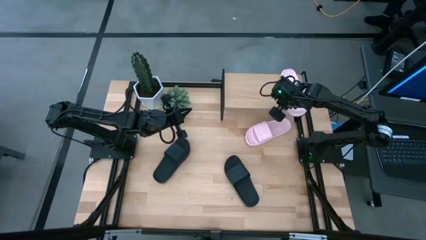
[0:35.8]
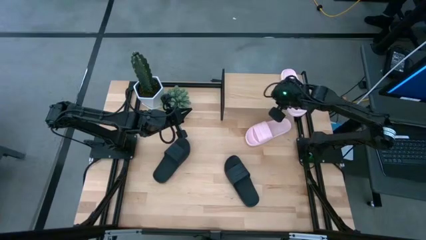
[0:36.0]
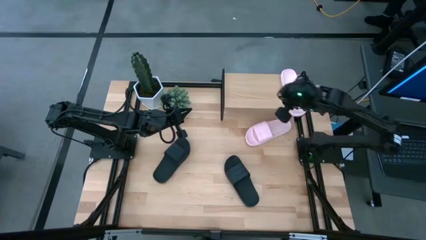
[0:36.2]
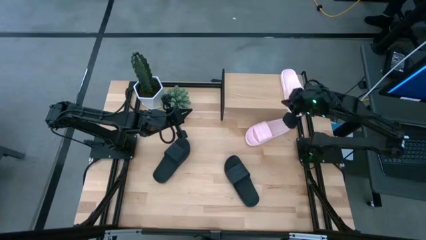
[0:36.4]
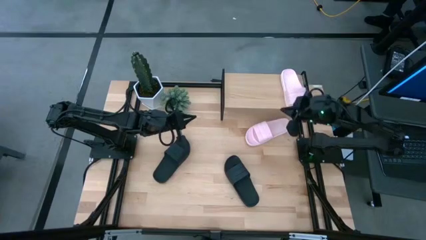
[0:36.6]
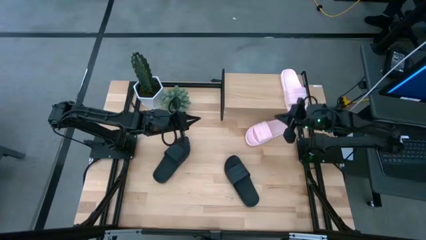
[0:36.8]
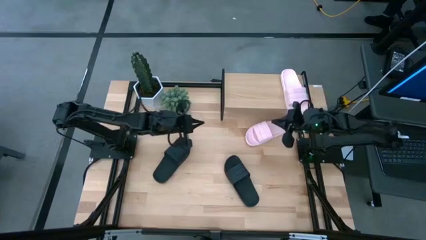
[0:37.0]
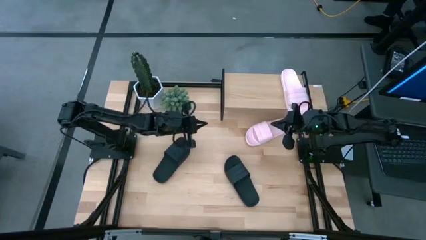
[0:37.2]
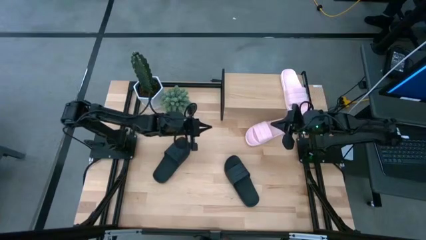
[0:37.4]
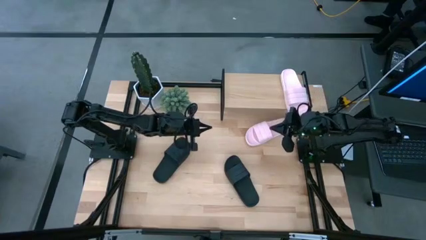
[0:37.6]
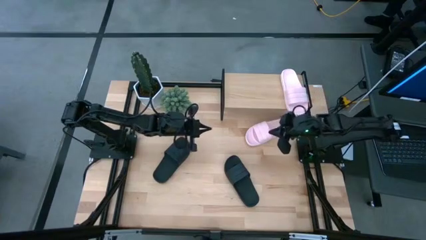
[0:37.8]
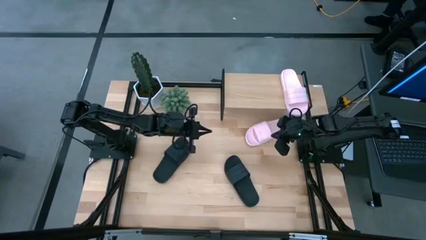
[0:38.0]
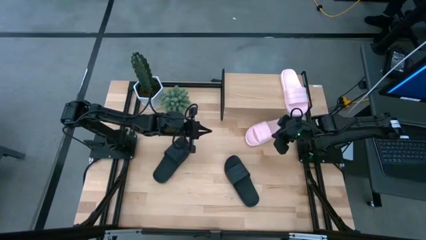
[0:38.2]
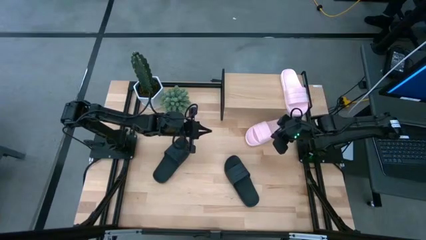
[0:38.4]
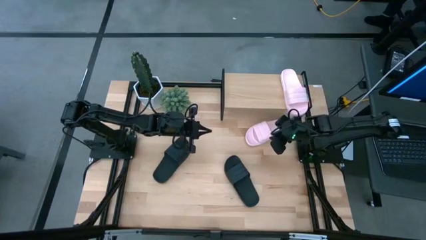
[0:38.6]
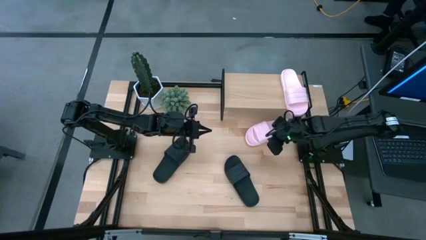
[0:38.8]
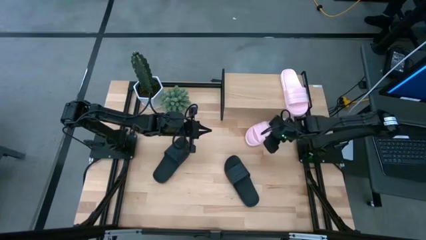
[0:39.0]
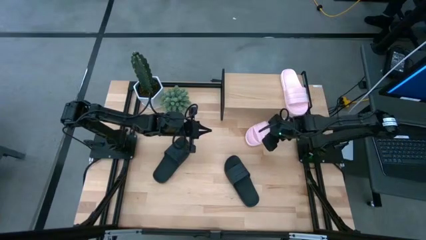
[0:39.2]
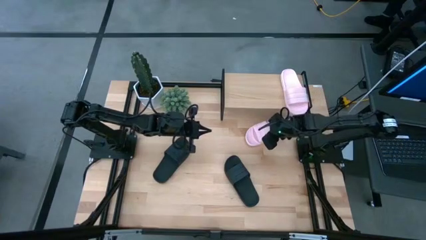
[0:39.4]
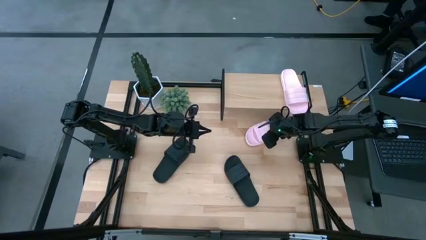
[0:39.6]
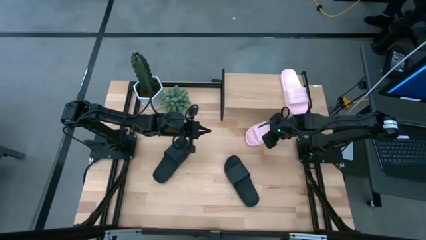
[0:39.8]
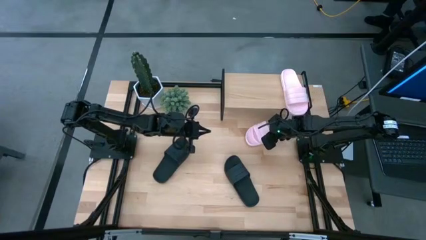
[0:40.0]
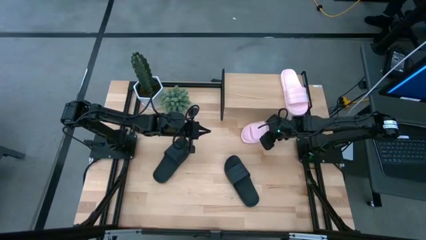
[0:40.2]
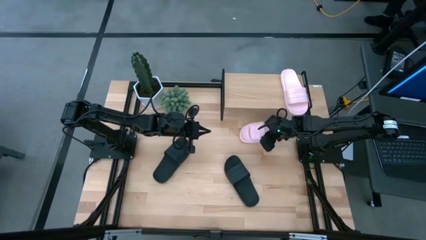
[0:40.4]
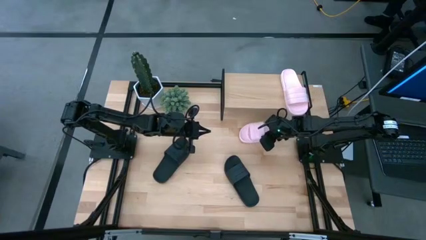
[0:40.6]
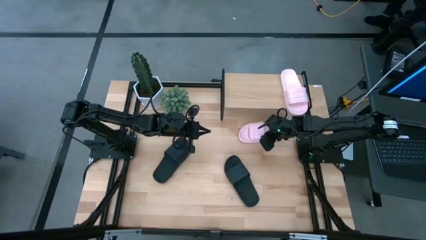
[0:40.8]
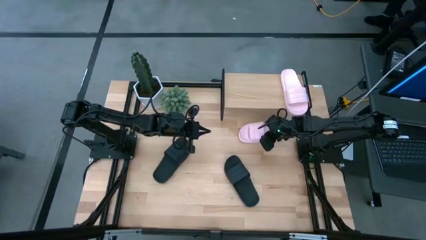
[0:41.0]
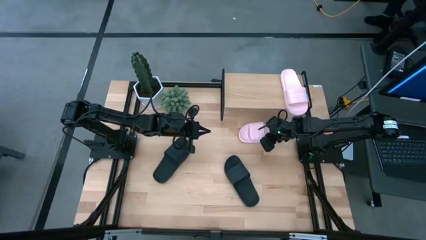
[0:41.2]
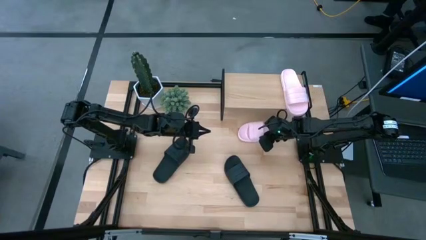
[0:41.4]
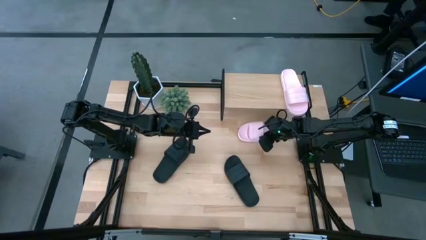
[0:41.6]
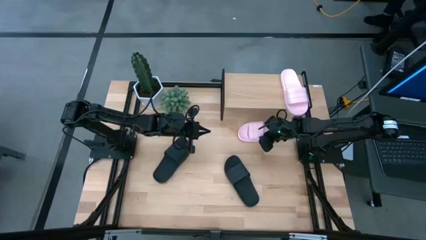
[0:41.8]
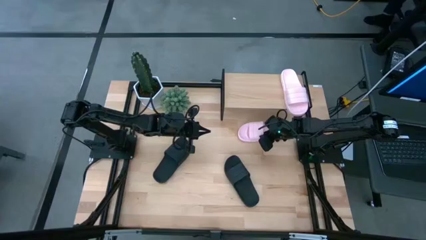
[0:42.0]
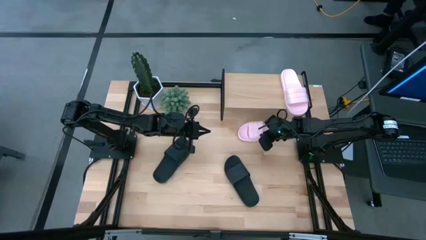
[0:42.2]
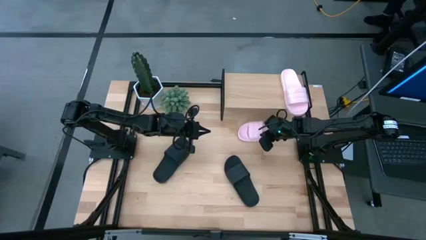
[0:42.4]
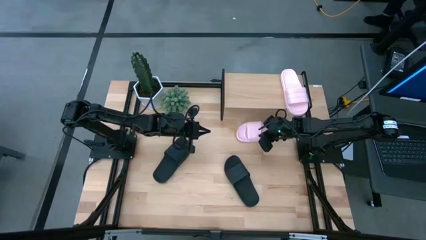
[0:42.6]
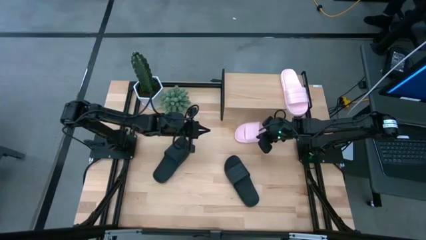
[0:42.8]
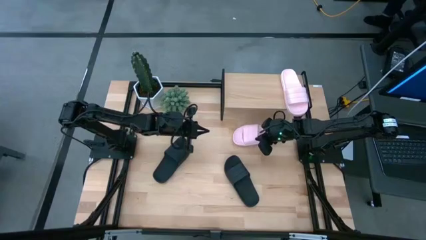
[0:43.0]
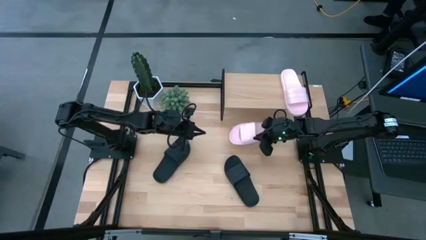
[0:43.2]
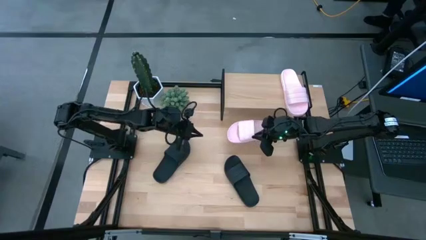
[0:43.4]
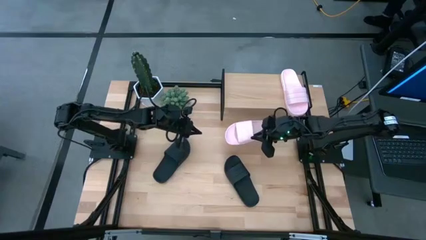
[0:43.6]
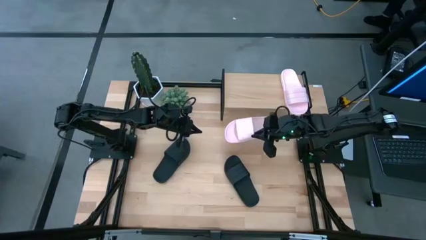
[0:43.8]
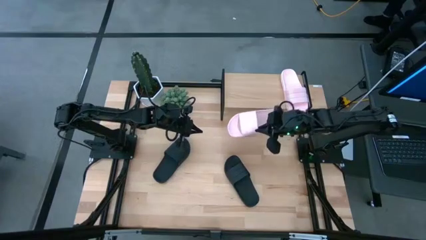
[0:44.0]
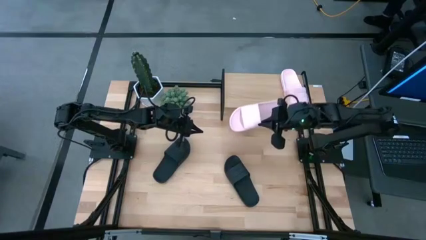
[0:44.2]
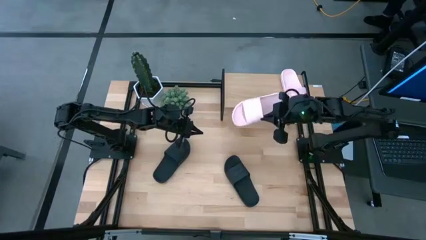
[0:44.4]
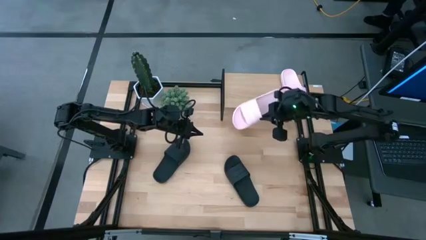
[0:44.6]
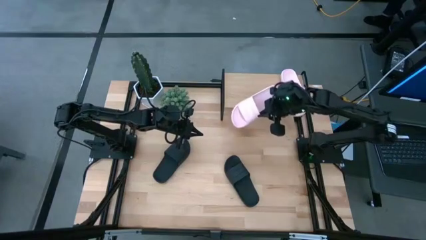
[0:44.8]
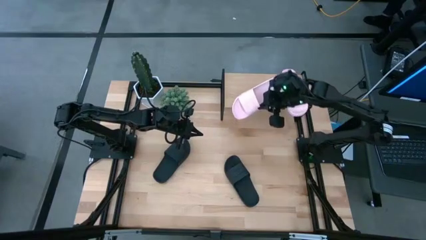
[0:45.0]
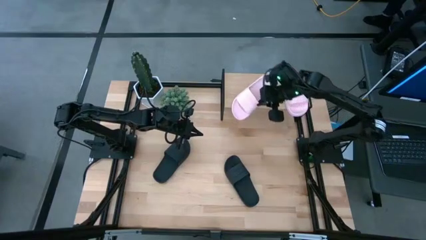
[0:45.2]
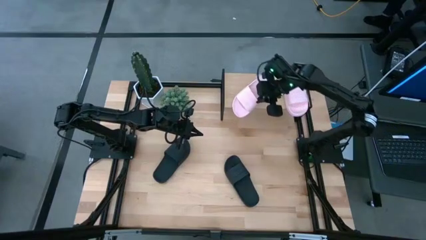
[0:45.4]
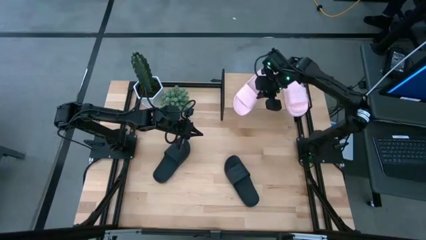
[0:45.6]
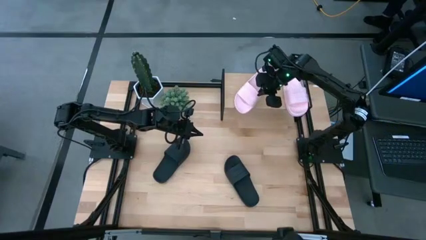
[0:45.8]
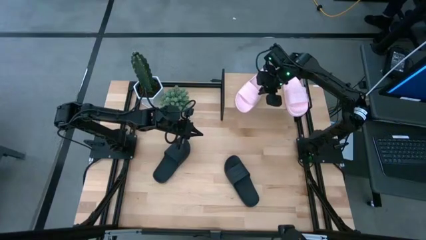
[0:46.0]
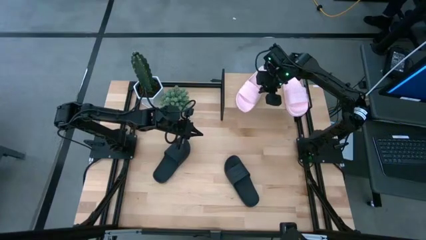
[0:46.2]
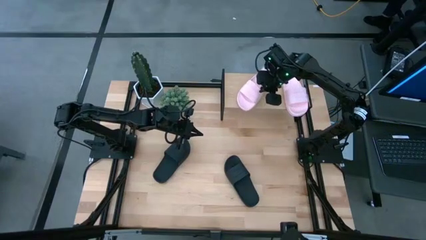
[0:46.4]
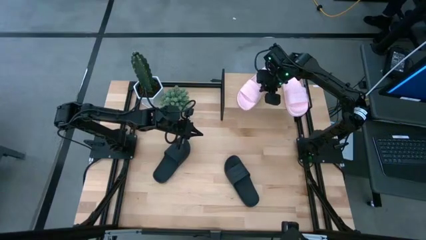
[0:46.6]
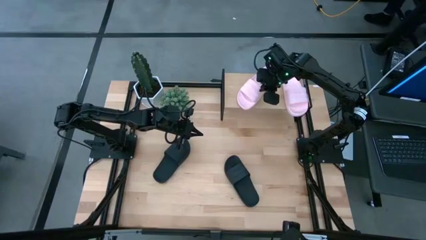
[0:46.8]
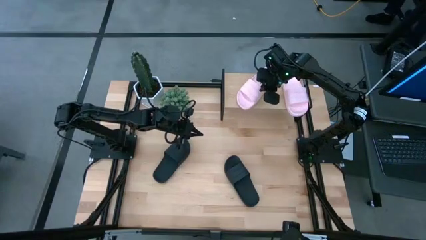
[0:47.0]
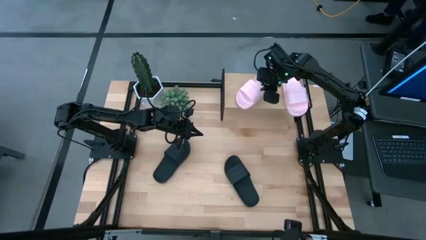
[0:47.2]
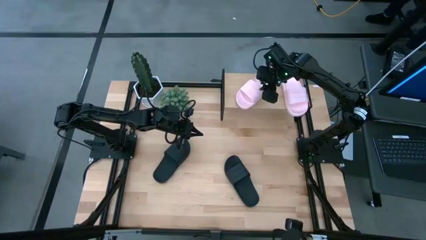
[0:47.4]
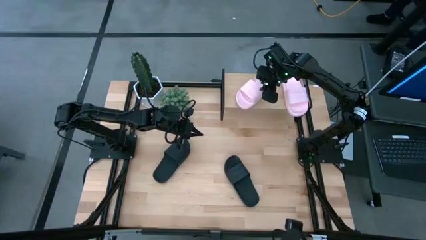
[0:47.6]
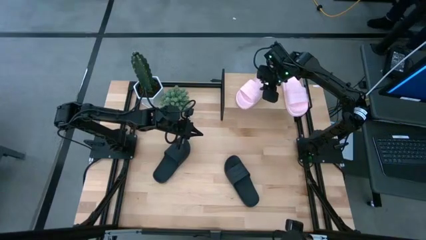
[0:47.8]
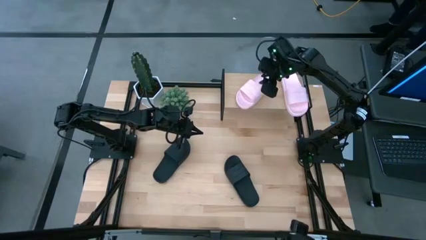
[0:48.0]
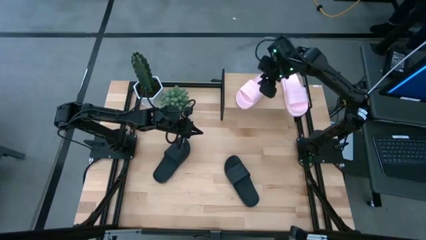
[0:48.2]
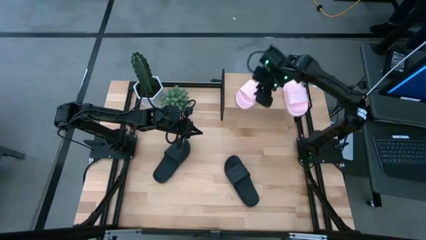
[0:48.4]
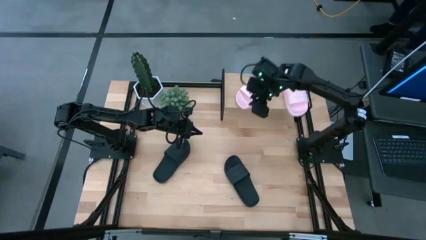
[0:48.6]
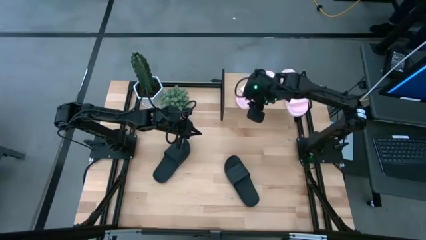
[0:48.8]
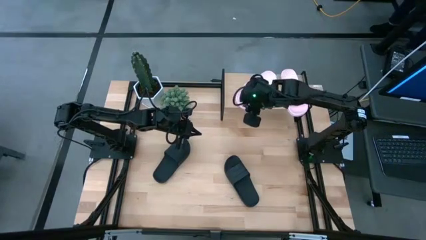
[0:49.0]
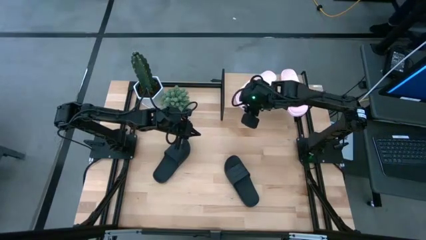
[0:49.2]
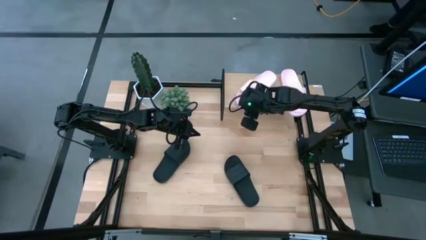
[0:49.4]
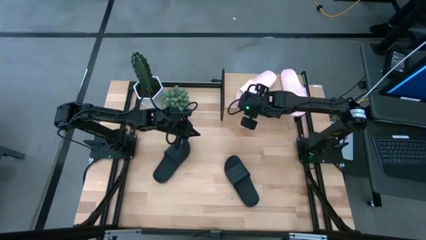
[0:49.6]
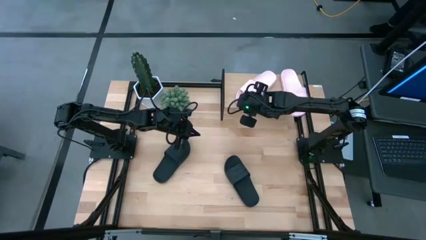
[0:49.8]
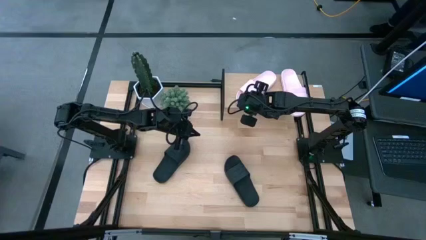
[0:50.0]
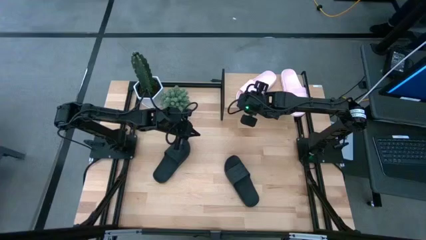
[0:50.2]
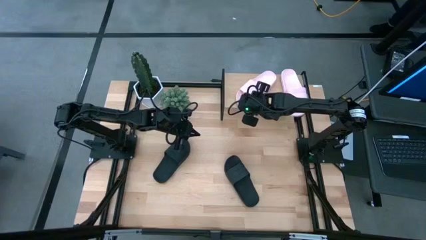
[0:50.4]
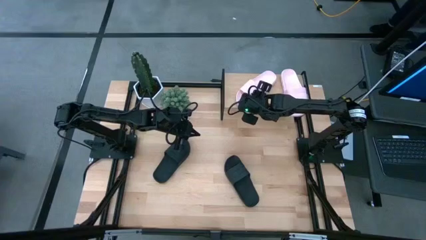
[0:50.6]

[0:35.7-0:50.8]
Task: Pick and place slides into the shelf
Put the pink slides on the shelf

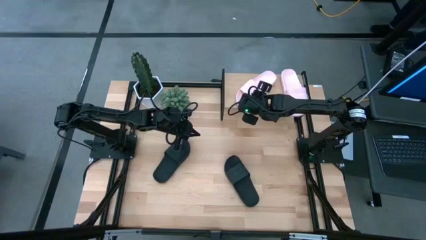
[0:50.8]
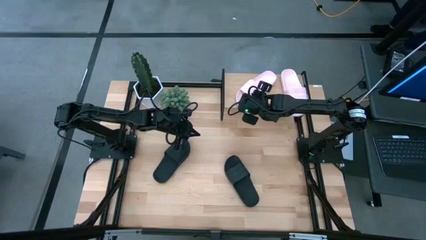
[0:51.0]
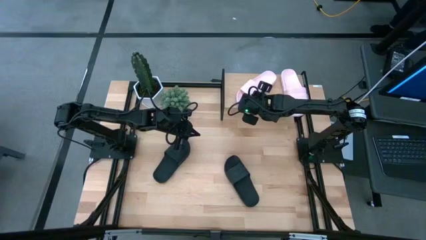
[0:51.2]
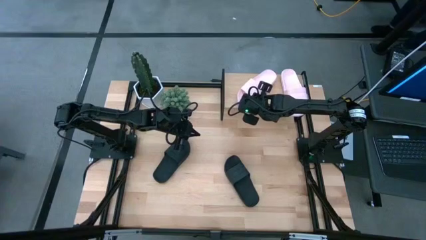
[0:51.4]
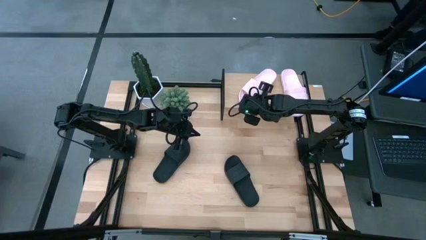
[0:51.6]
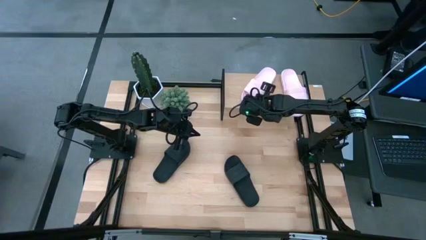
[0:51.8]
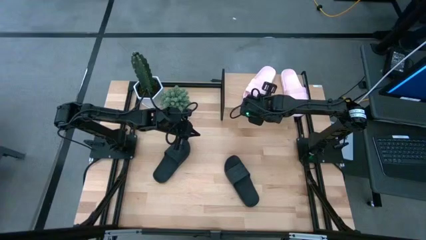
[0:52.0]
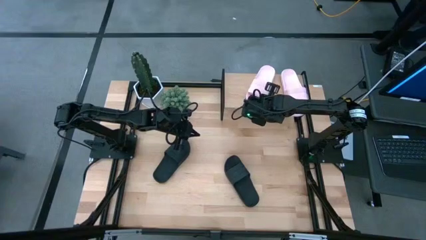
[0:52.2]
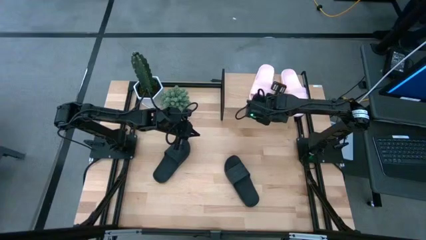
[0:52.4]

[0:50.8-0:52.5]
Put the pink slides on the shelf
